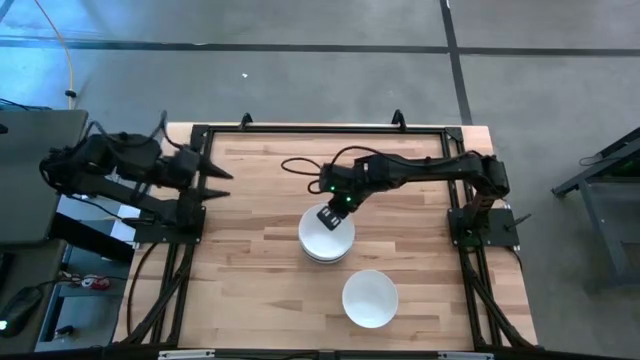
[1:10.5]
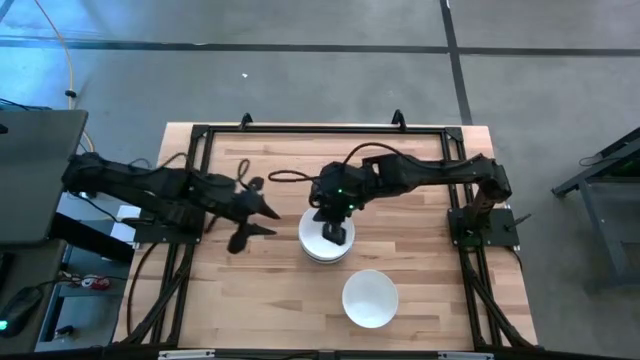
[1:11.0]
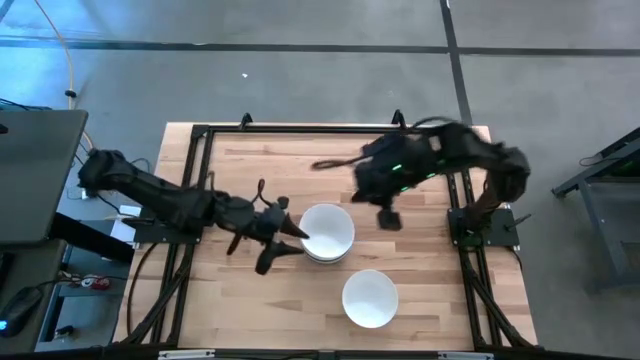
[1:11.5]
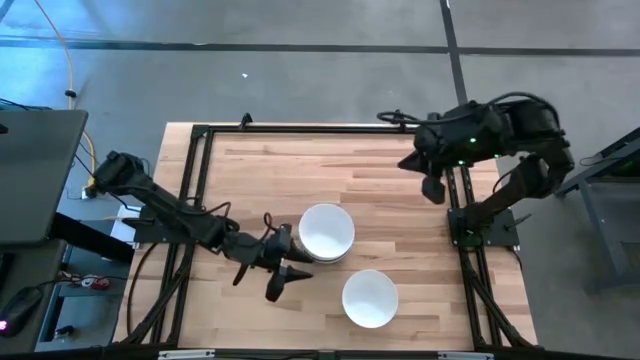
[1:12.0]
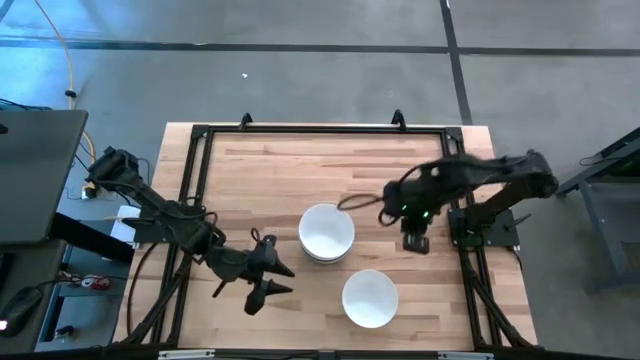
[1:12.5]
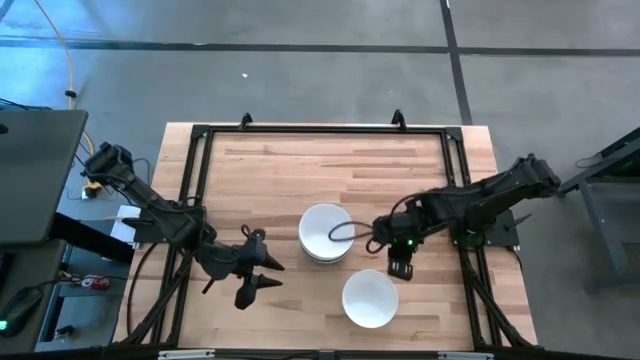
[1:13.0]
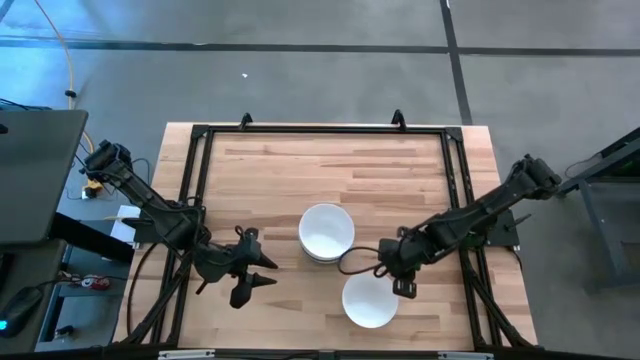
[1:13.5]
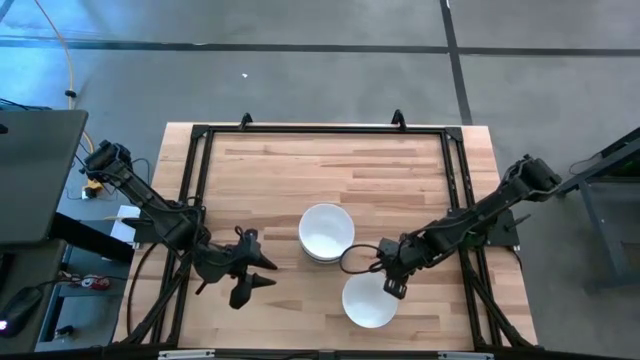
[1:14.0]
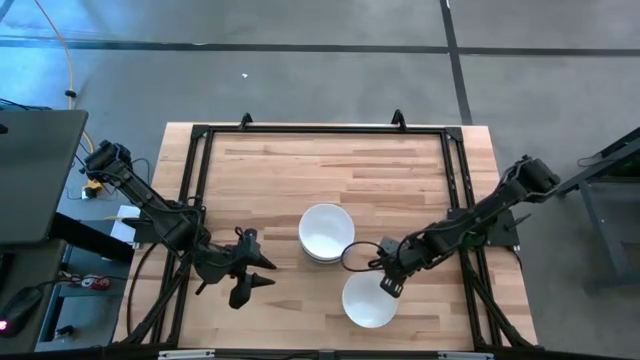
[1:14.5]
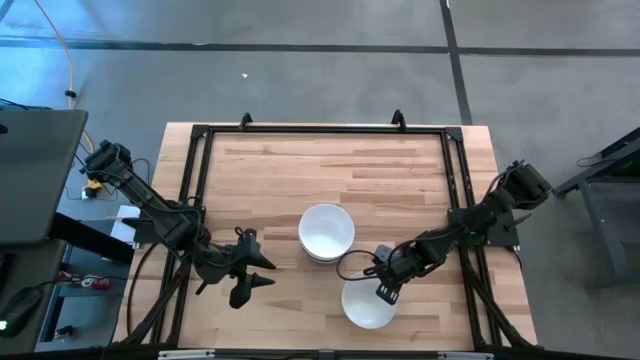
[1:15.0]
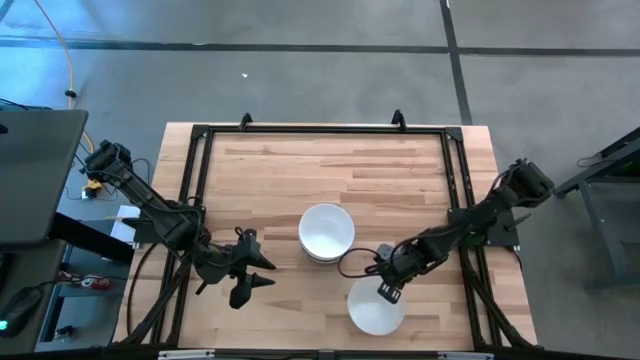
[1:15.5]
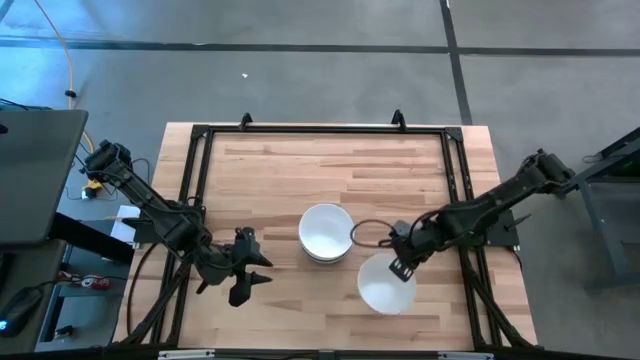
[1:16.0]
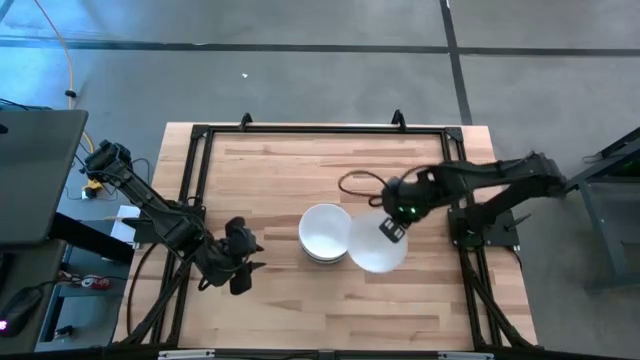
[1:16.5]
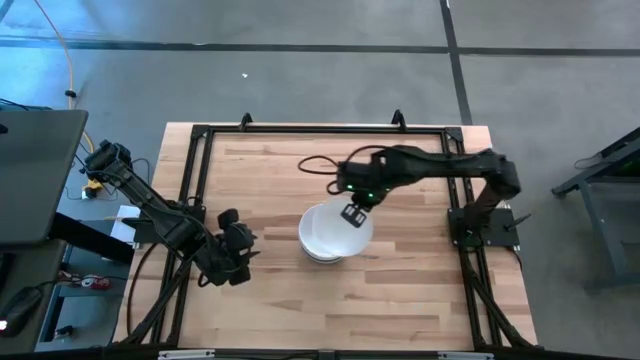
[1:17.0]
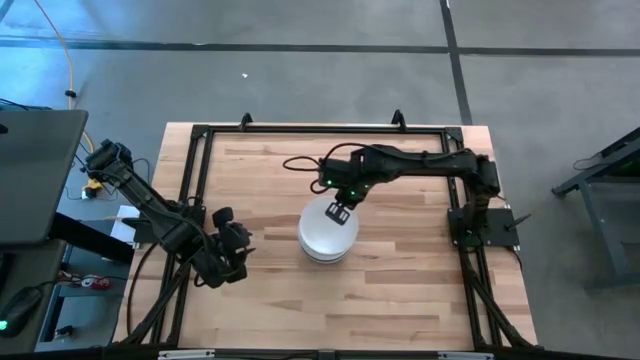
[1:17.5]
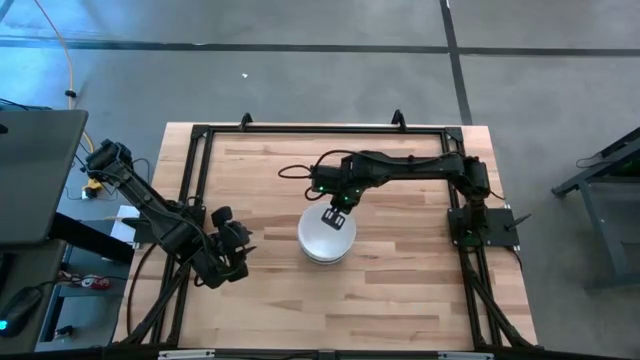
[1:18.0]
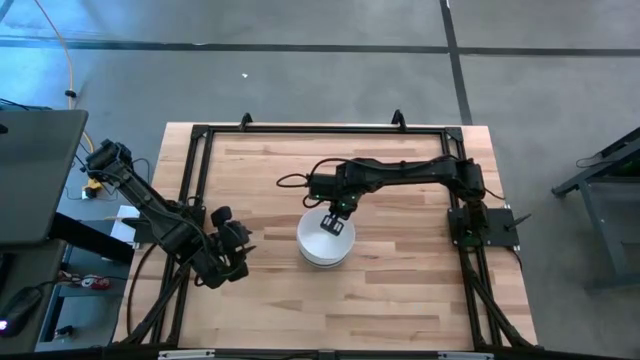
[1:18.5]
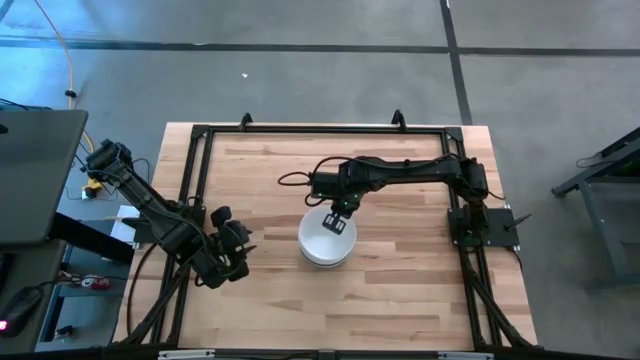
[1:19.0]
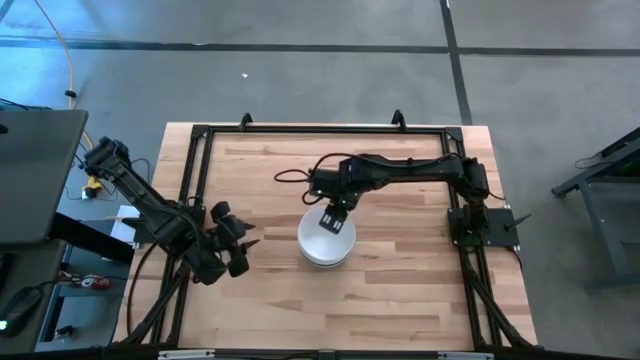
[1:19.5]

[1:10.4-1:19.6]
Task: Nest bowls inside each other
Stack the white bowl on top of the white bowl

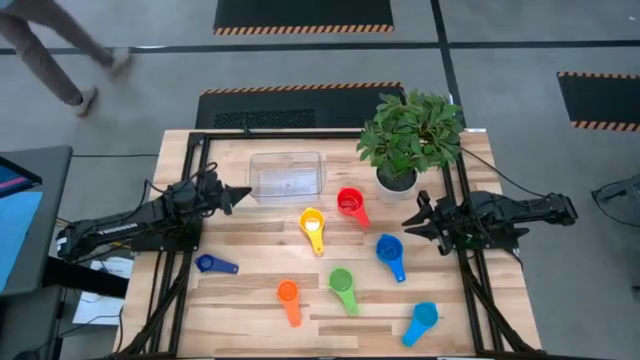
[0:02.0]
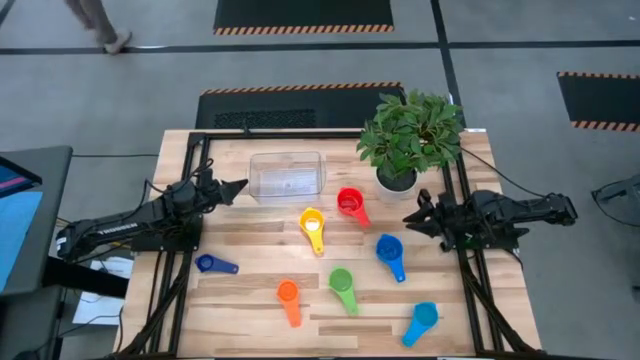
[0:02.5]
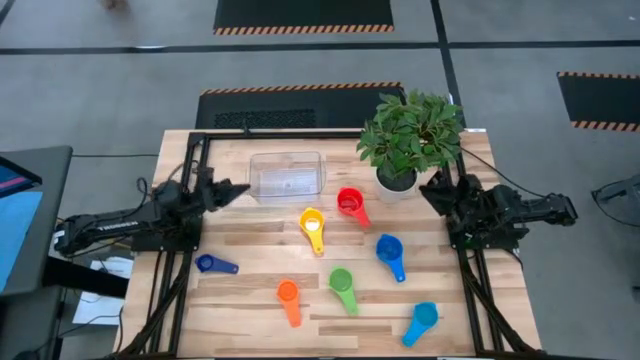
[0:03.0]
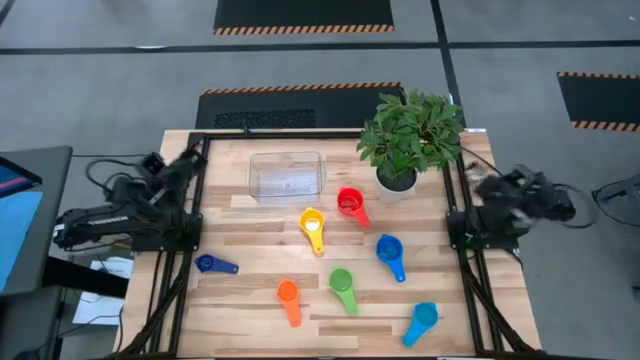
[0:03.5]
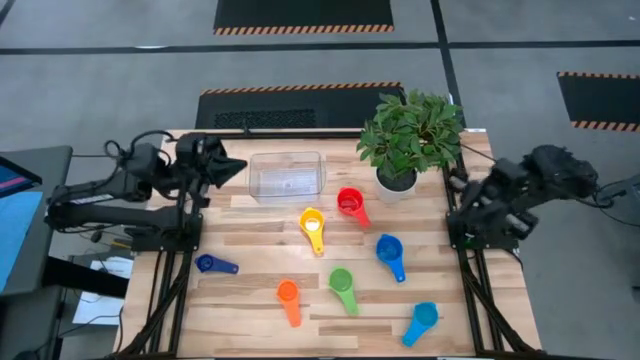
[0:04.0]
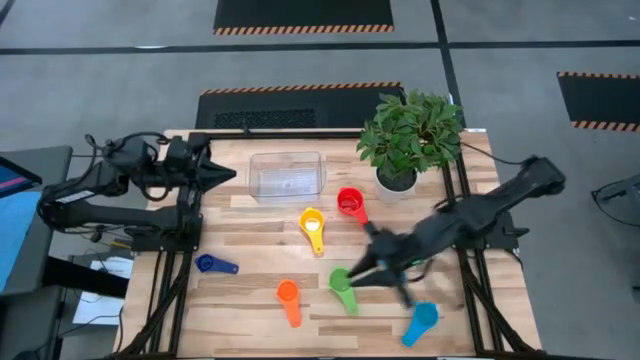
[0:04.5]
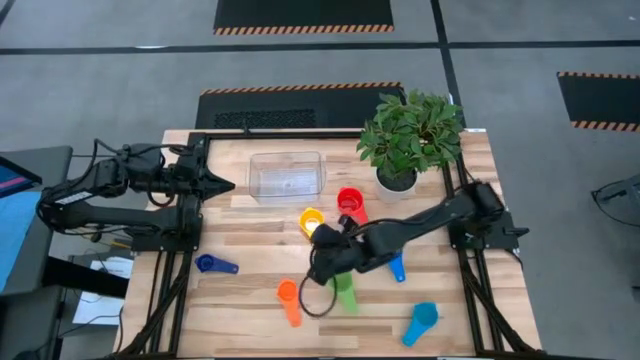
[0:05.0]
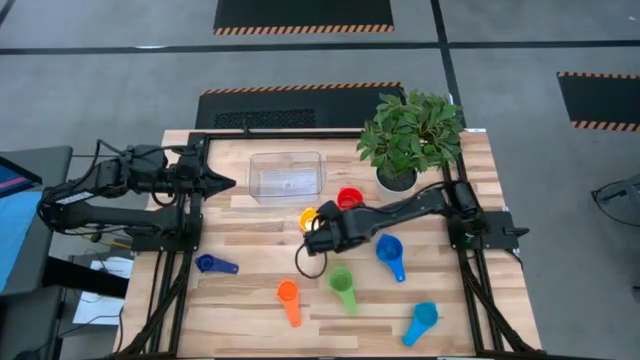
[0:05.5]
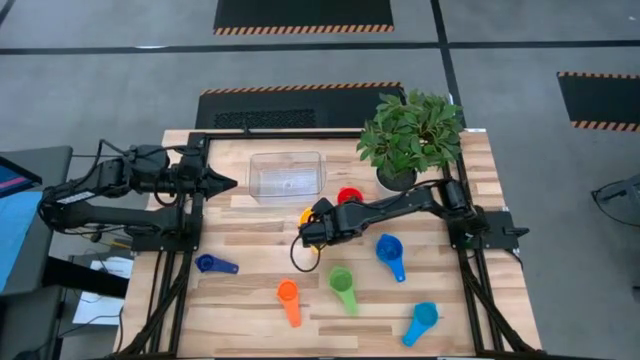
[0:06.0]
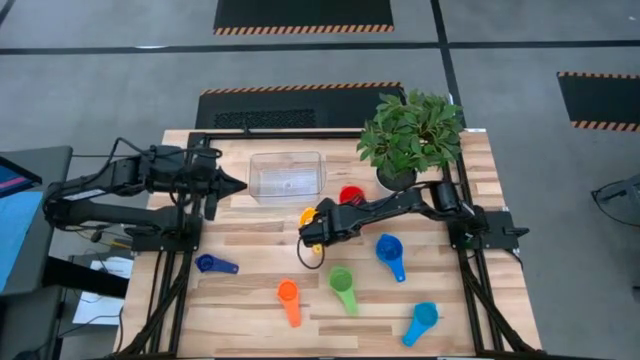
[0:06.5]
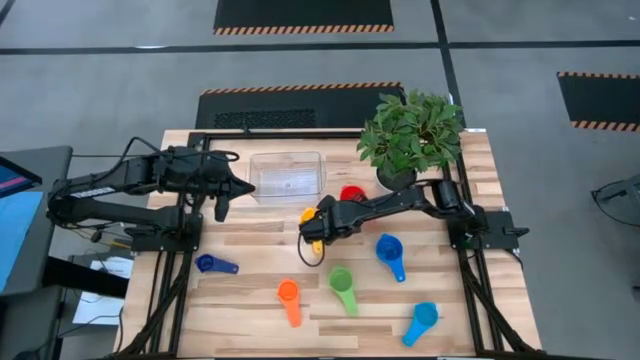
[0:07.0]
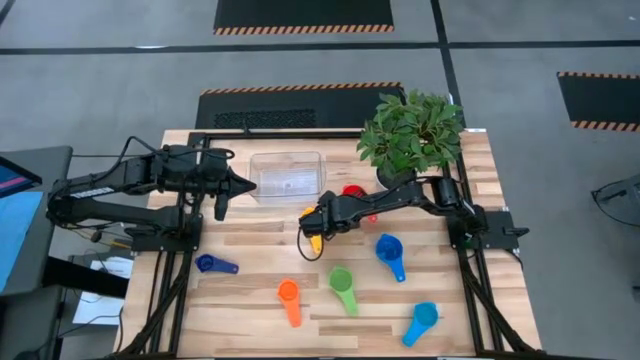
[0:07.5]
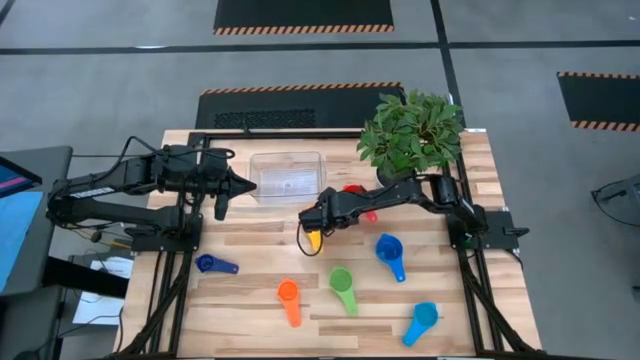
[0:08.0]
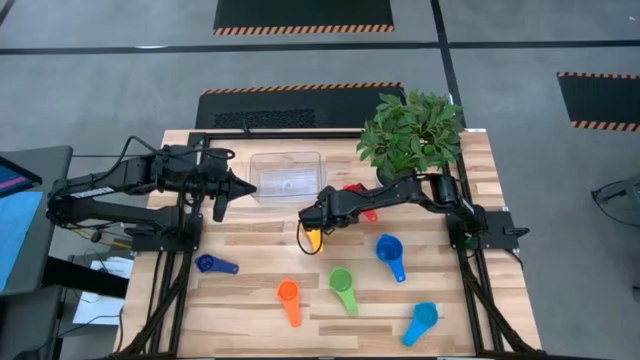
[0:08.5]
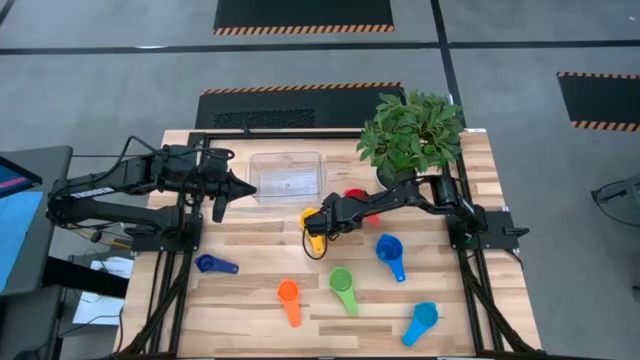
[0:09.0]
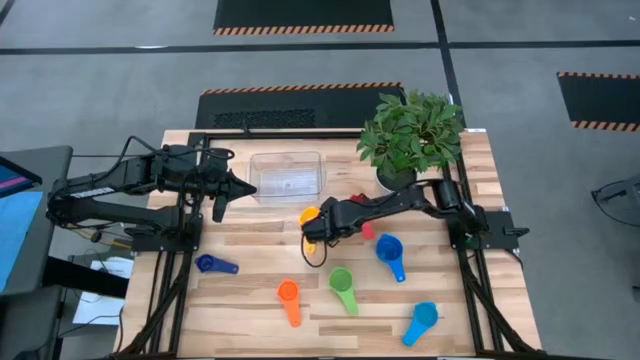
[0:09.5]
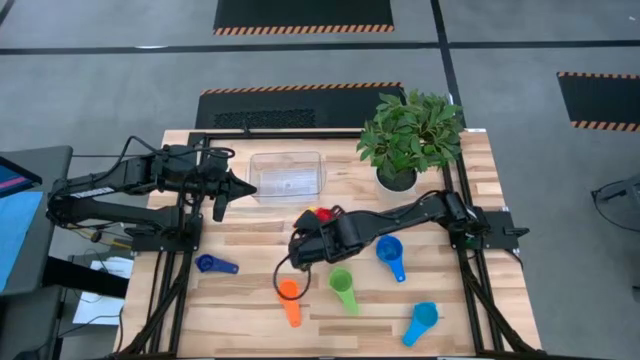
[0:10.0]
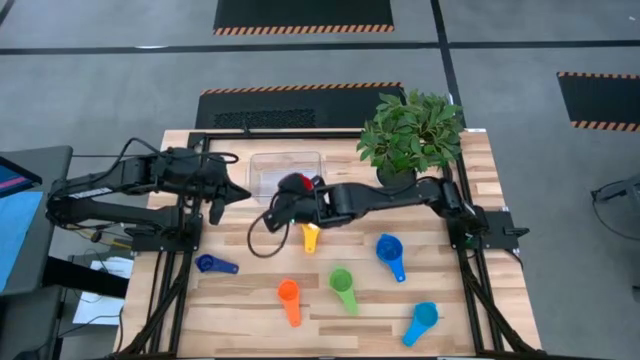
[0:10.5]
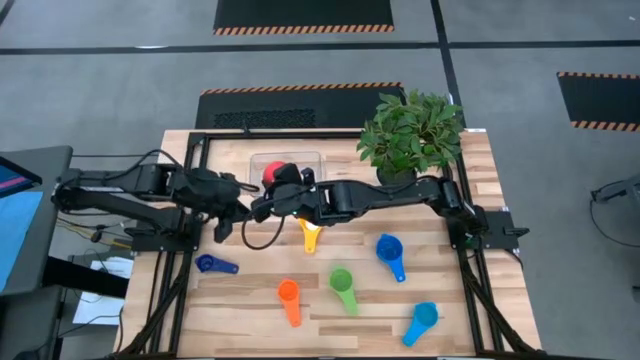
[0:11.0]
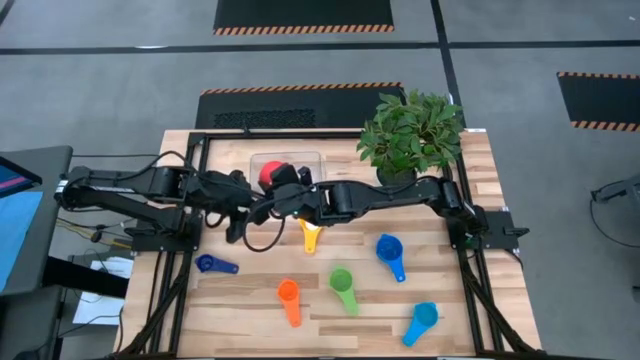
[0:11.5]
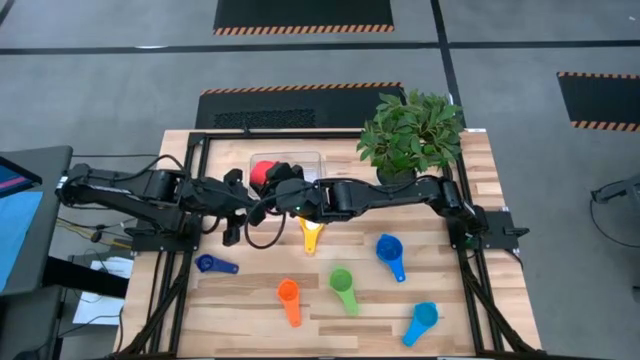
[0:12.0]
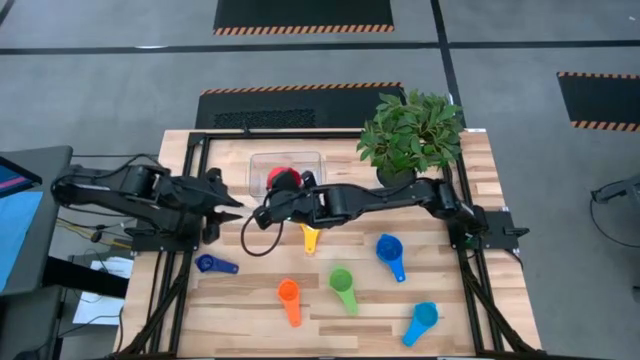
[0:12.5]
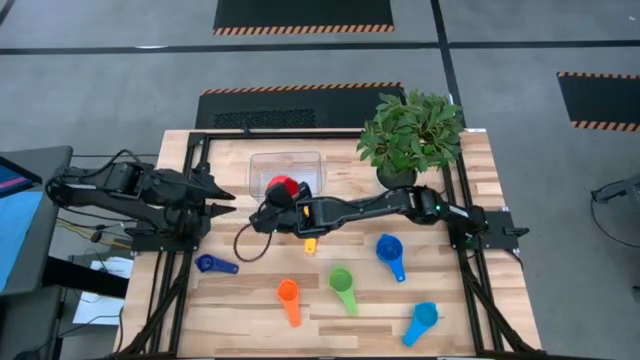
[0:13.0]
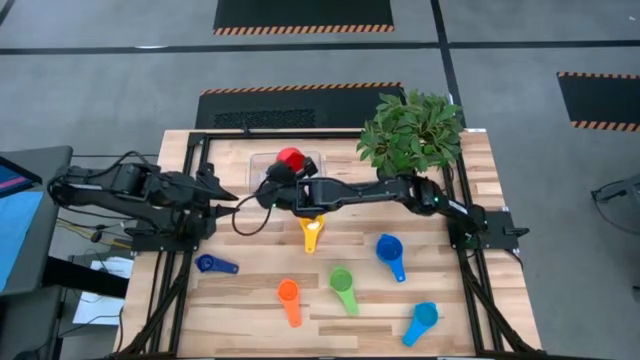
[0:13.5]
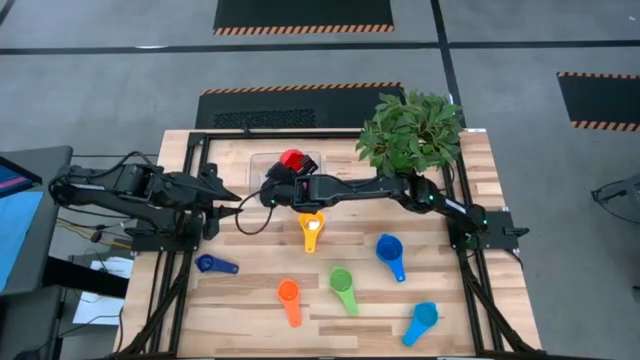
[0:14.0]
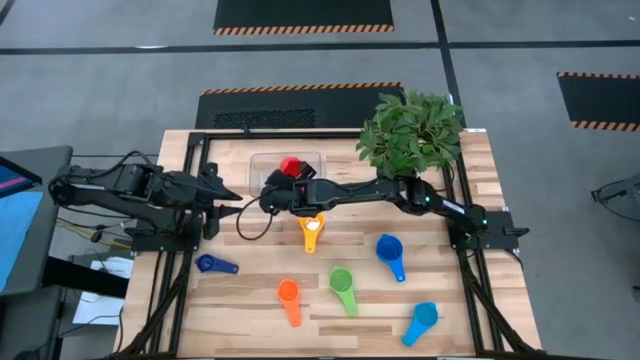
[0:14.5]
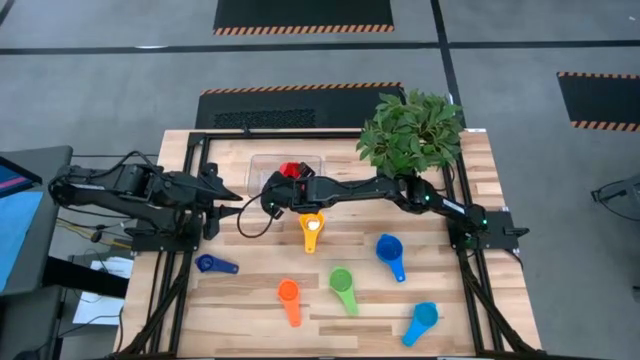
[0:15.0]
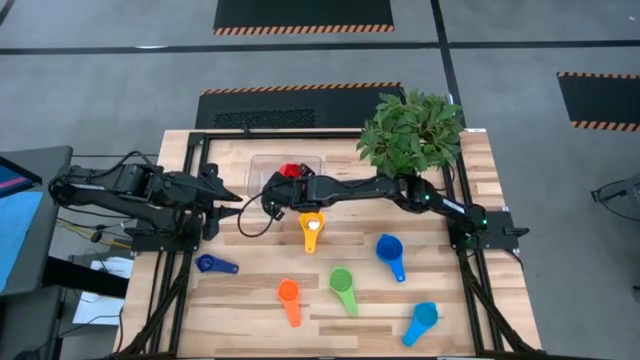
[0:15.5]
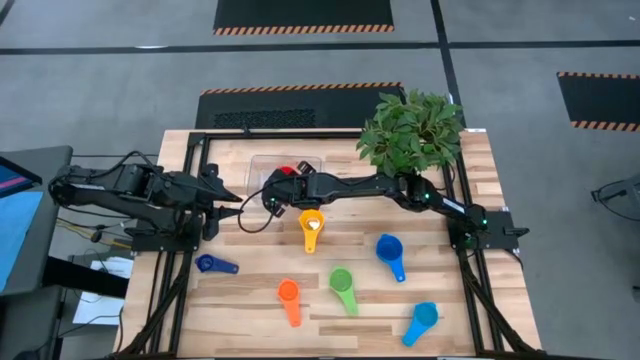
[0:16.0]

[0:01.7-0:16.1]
Task: Nest measuring cups in basket
Put the red measuring cup in the transparent bin
